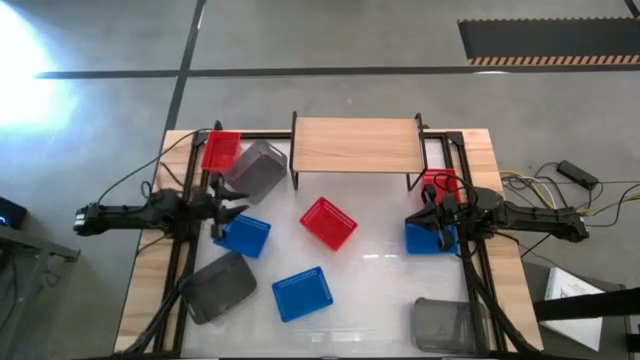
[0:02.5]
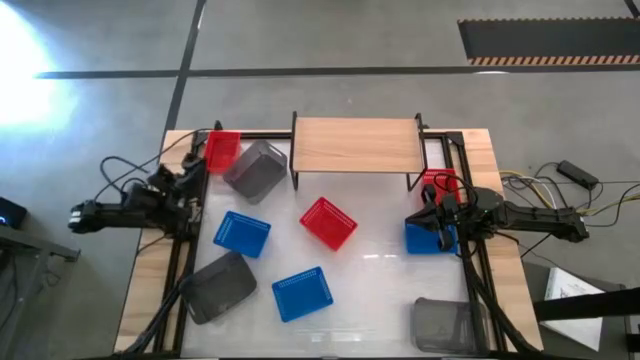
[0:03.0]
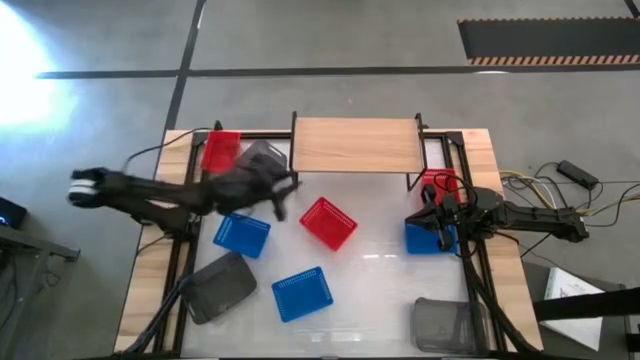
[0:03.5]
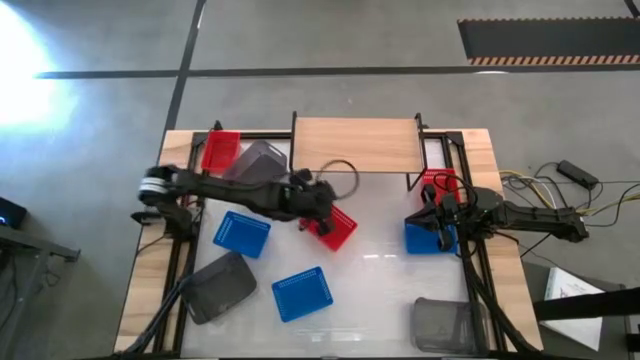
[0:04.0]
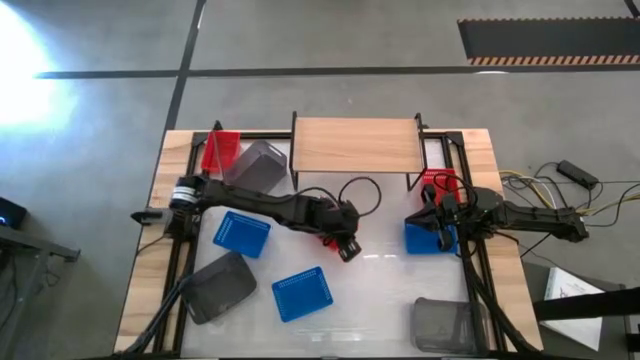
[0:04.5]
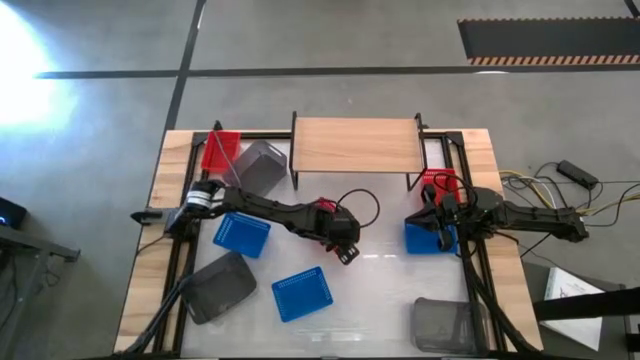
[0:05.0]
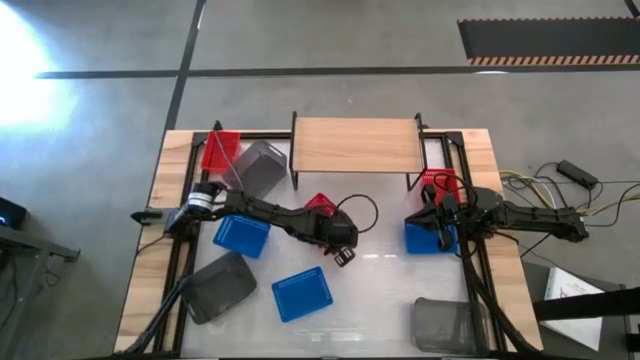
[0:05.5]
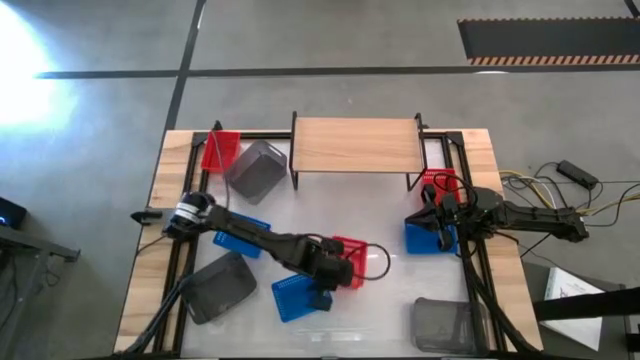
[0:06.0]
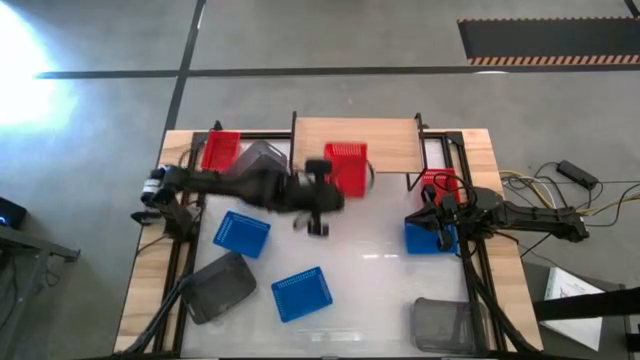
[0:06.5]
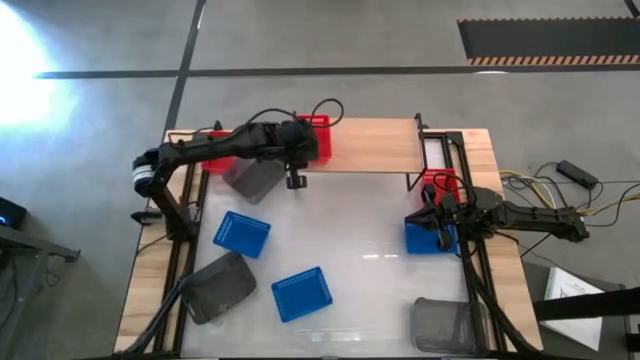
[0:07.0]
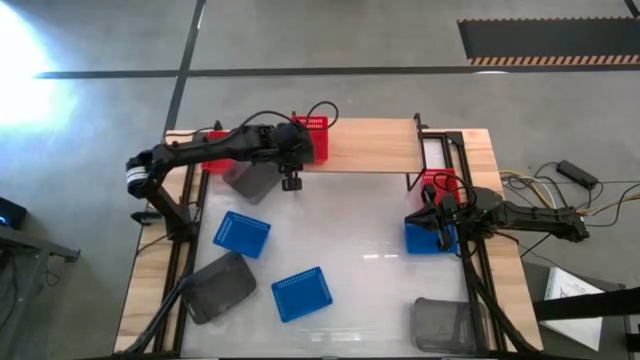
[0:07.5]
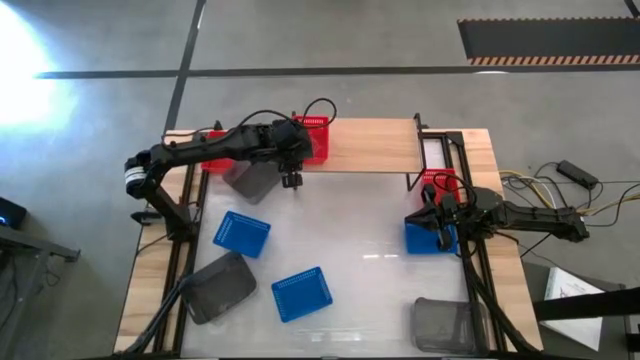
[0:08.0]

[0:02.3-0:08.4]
Task: Stack baskets on shelf by color
Put the middle red bin on the shelf

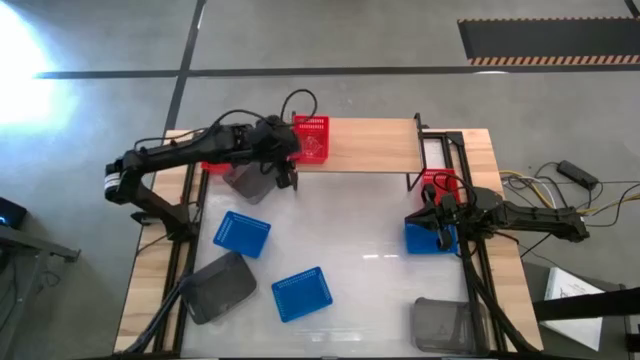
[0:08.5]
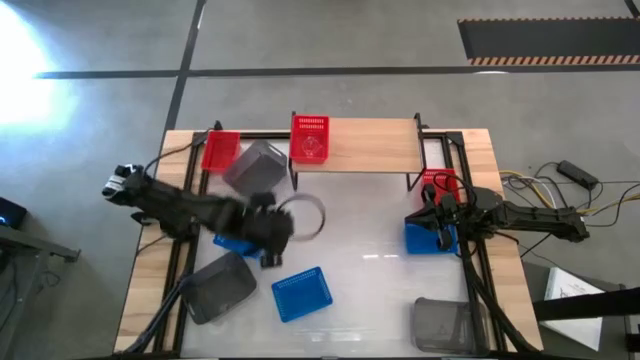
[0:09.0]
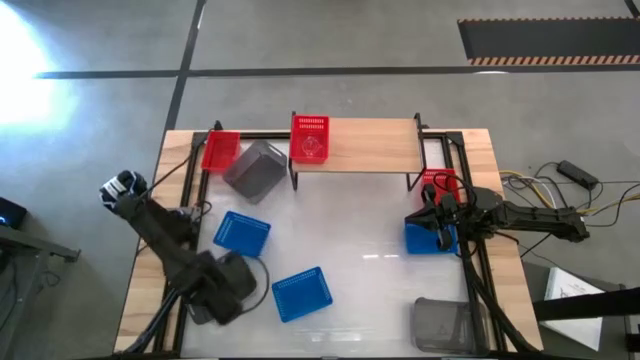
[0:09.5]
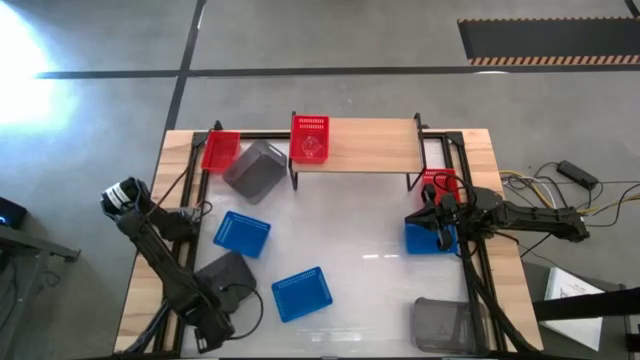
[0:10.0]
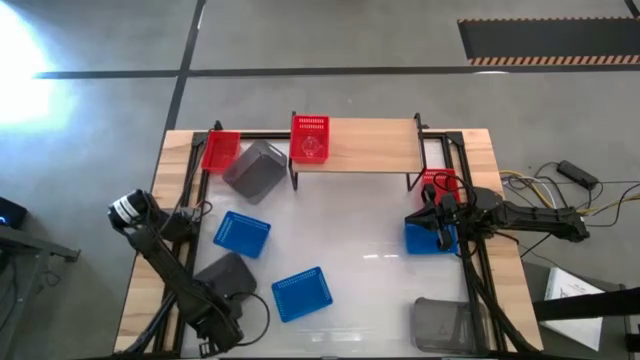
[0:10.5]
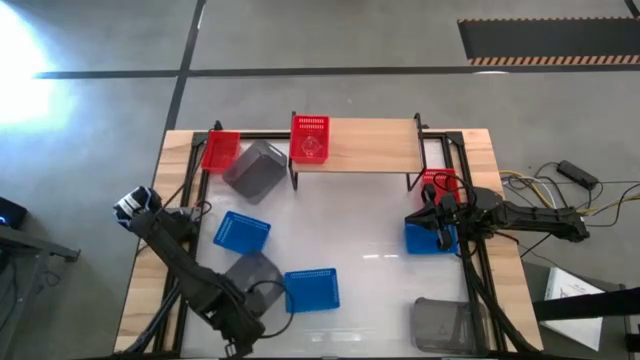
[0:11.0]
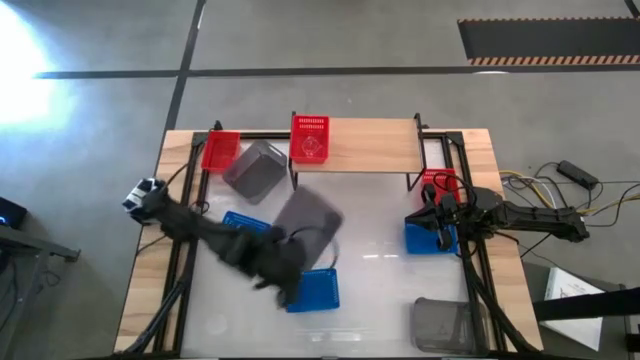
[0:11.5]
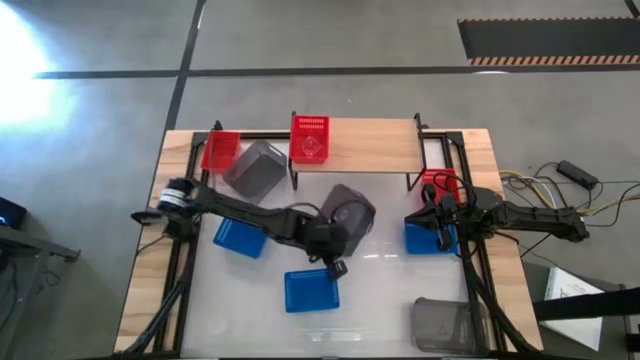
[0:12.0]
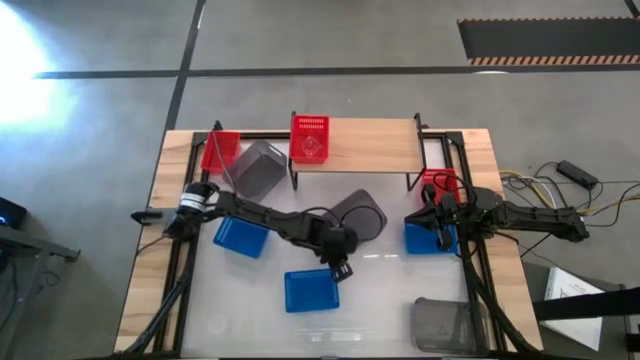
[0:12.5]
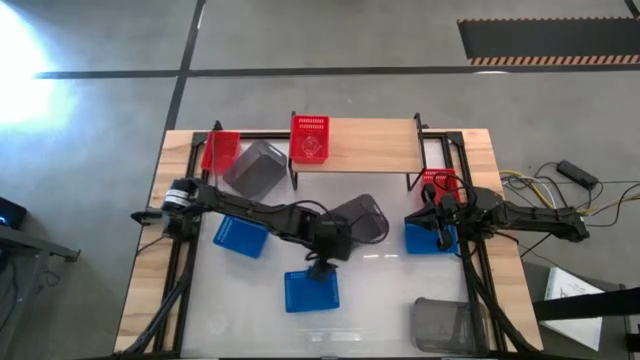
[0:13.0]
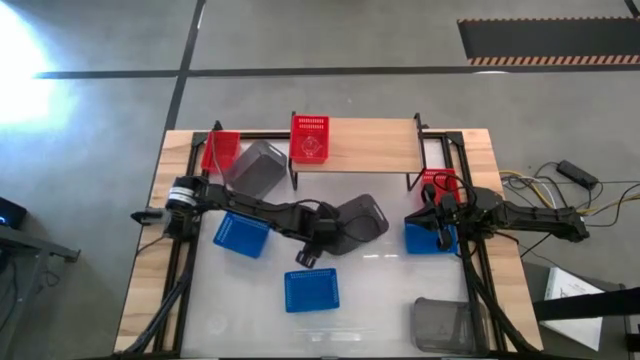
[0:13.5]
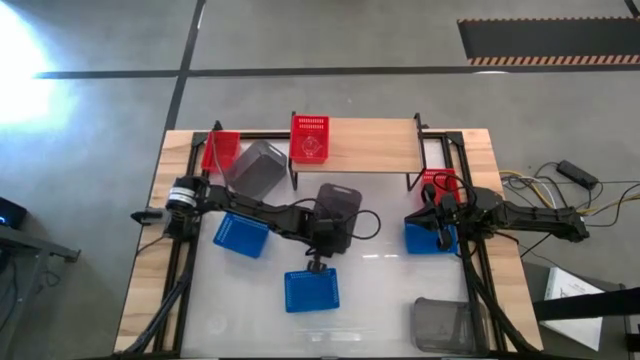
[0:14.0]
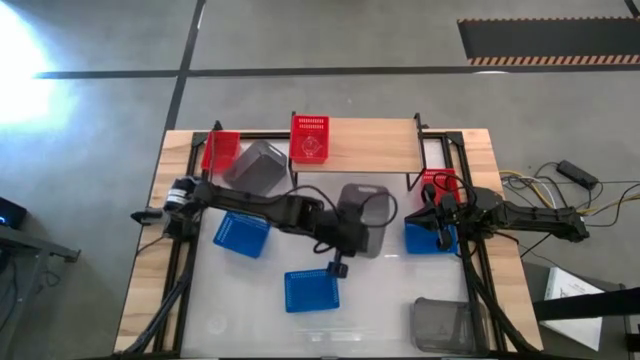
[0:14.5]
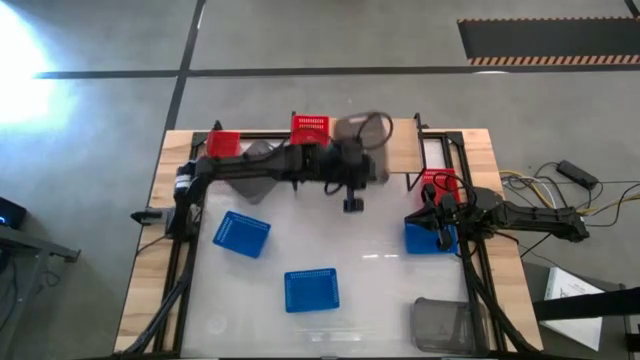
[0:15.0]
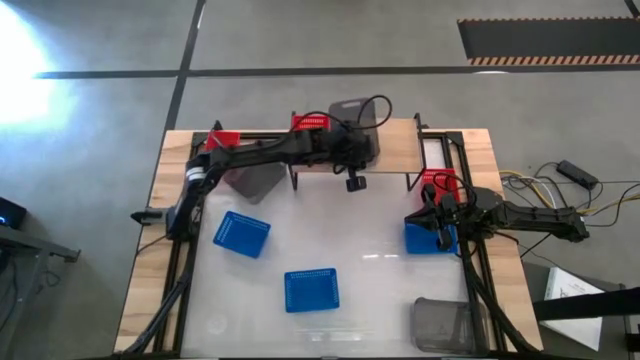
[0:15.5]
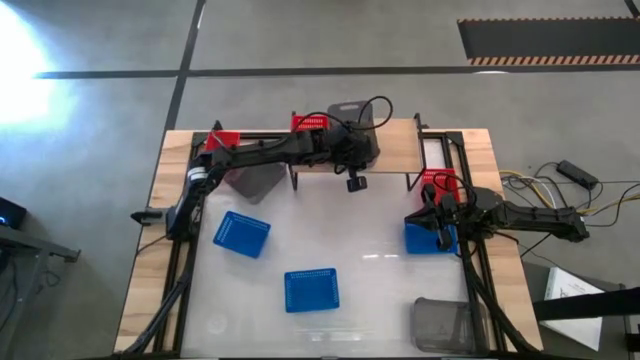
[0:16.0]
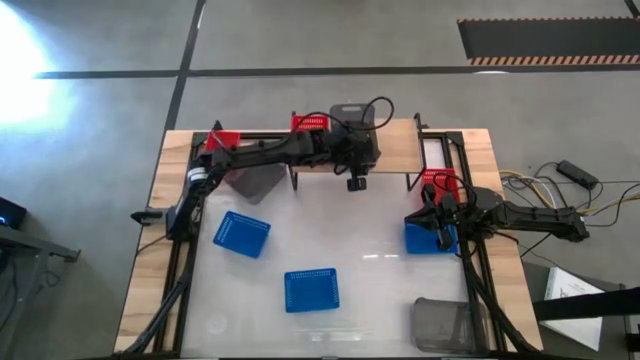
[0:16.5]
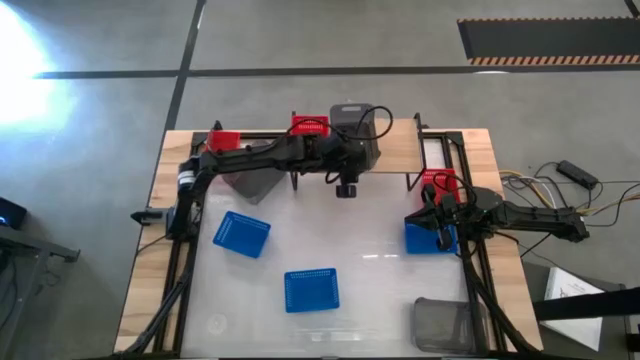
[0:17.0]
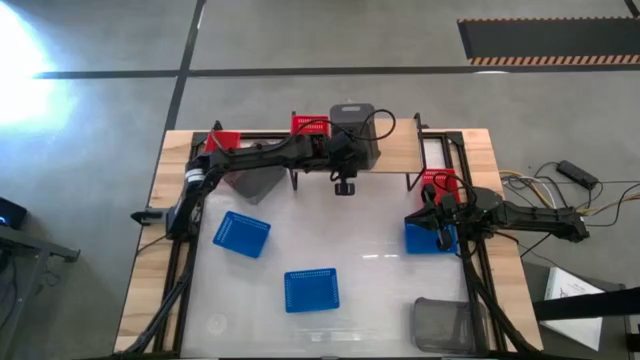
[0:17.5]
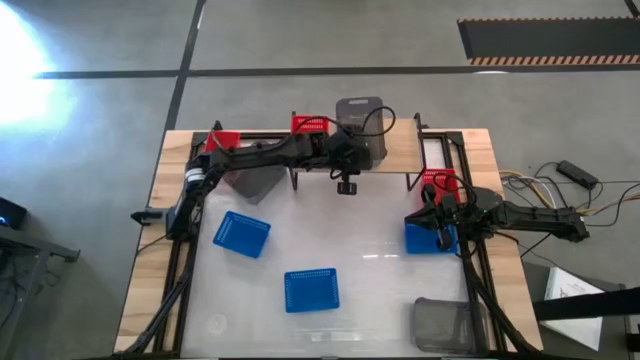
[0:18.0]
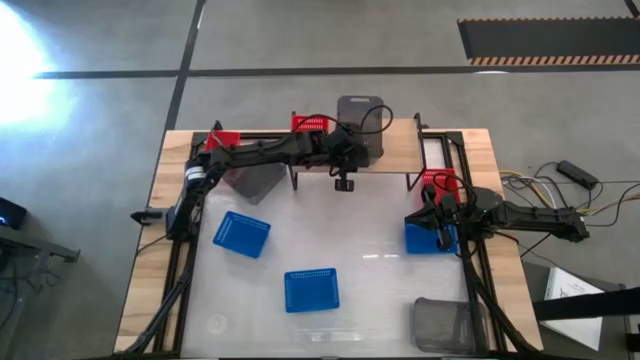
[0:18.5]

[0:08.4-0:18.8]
Put the bottom left black bin on the shelf

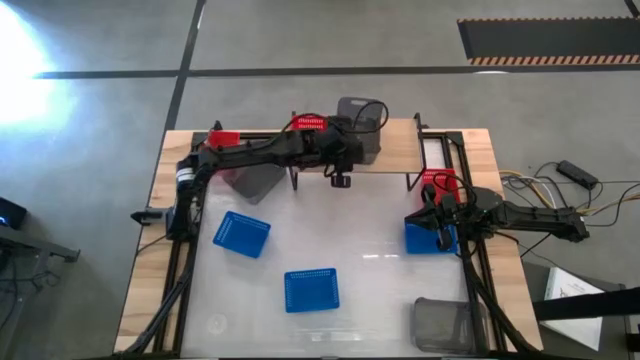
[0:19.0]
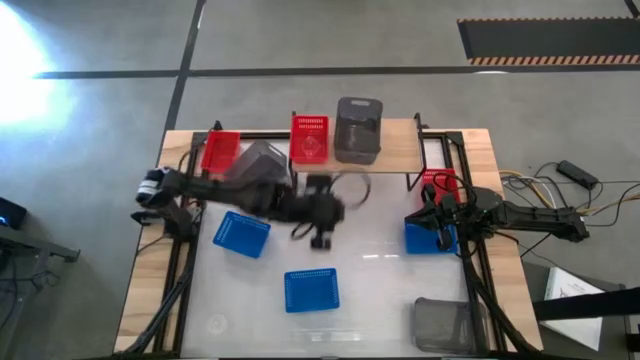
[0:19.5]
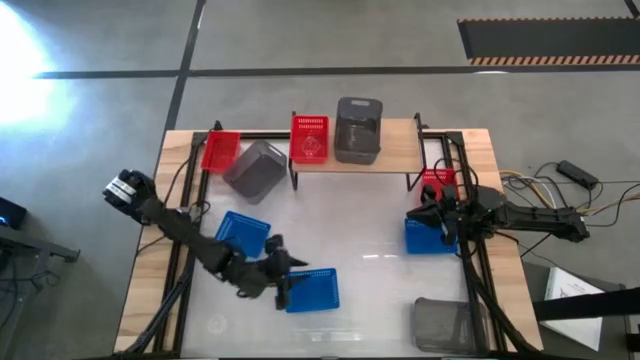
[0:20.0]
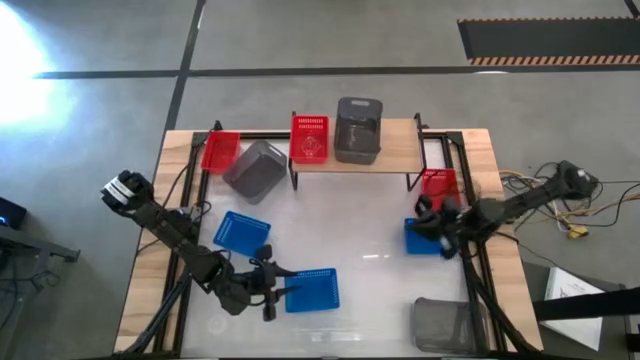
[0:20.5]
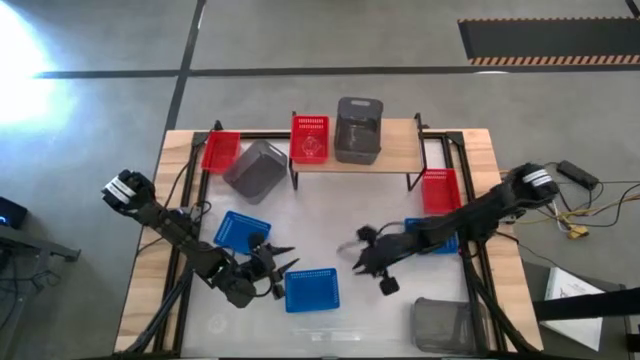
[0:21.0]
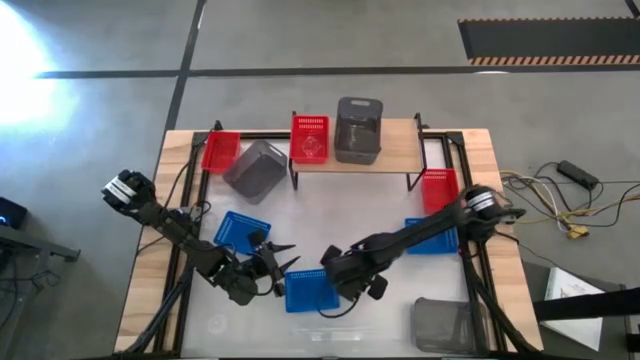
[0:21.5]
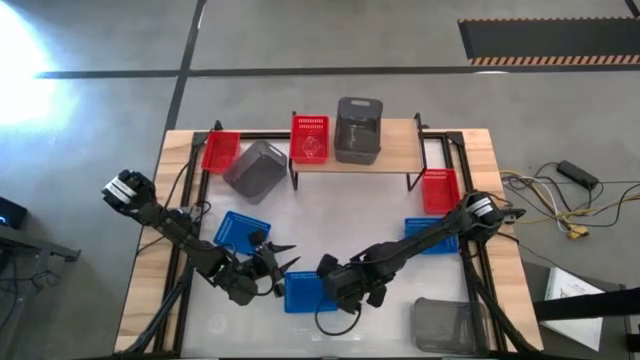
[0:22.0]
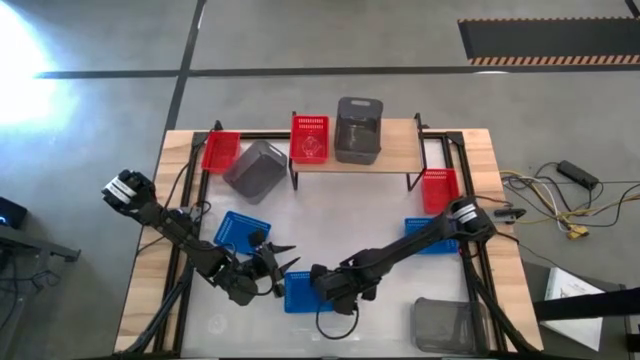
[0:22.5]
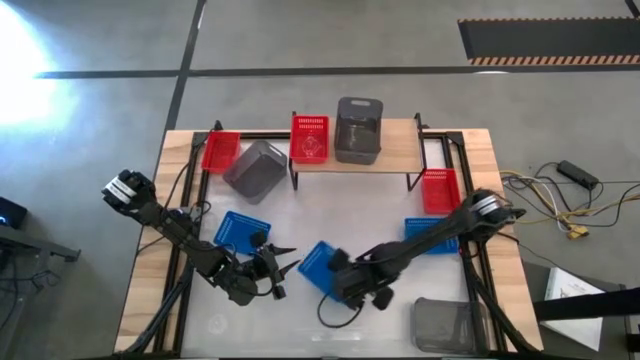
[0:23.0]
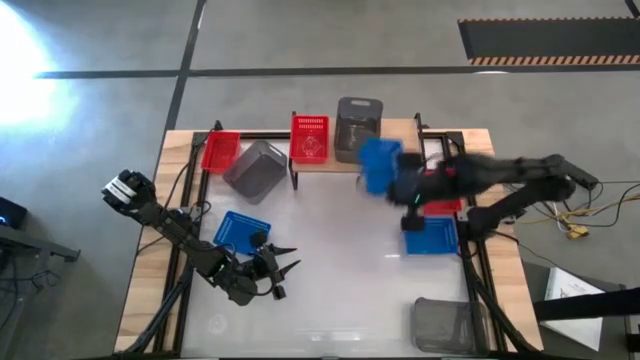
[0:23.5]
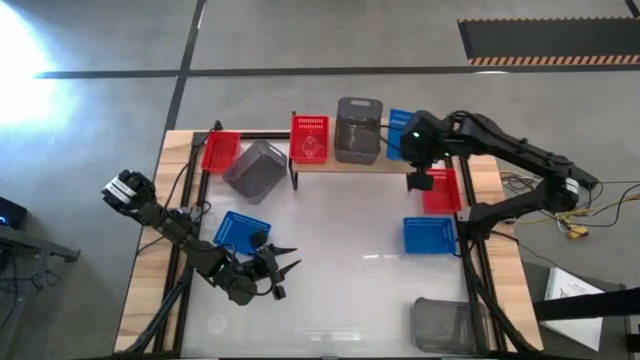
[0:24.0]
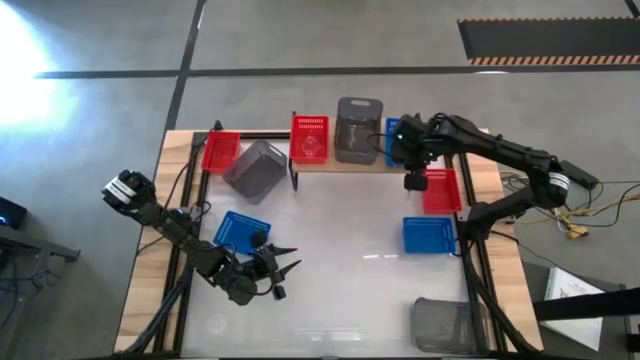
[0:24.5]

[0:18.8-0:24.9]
Put the middle blue bin on the shelf
